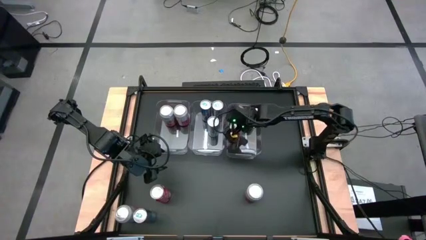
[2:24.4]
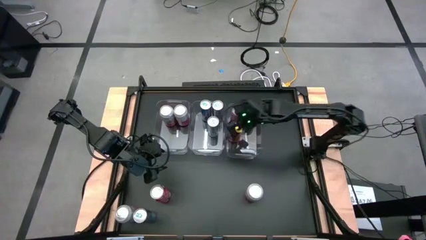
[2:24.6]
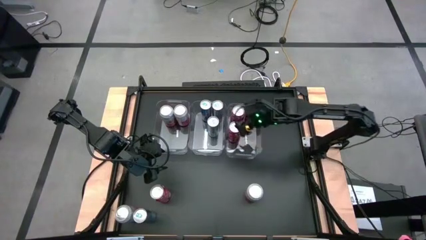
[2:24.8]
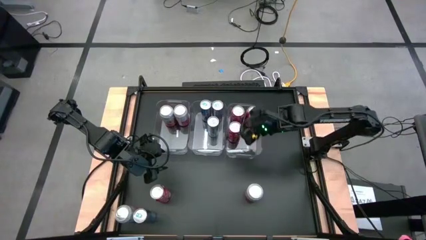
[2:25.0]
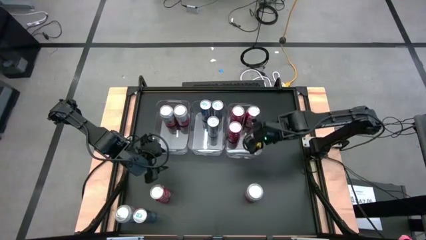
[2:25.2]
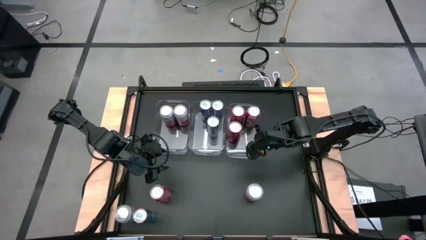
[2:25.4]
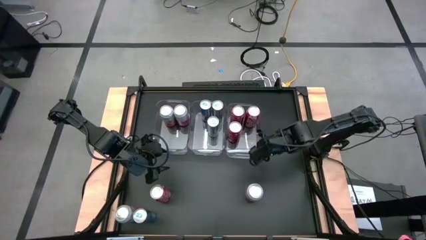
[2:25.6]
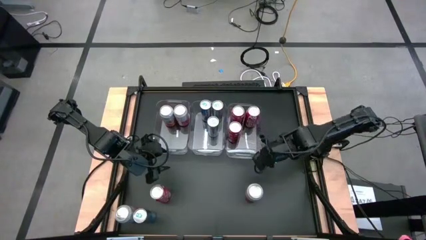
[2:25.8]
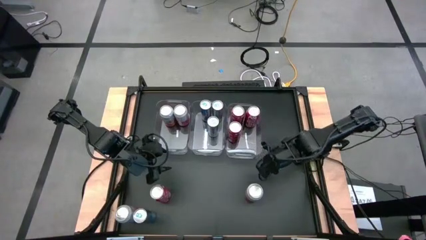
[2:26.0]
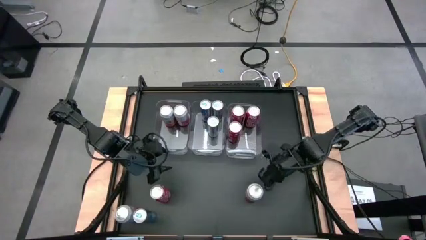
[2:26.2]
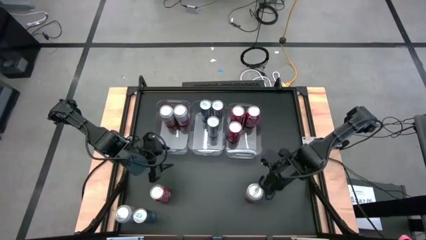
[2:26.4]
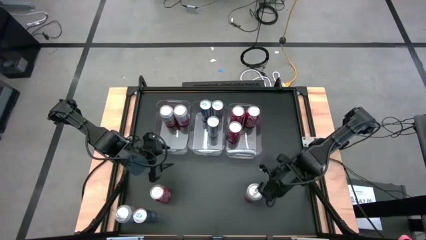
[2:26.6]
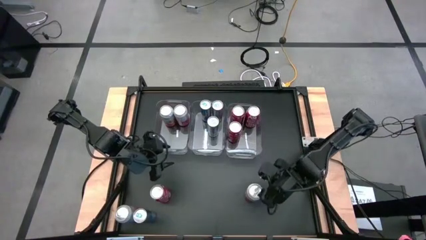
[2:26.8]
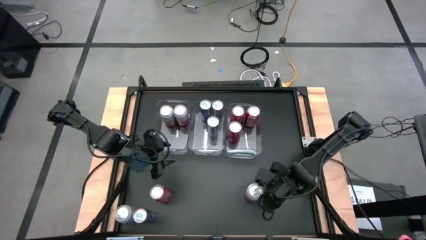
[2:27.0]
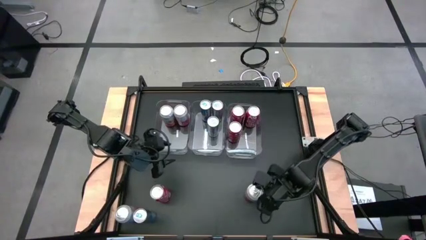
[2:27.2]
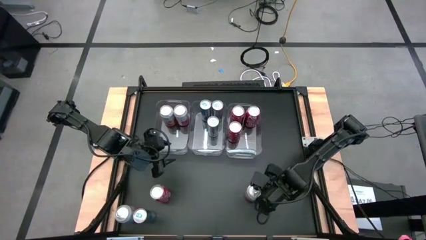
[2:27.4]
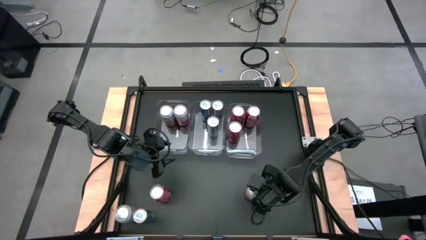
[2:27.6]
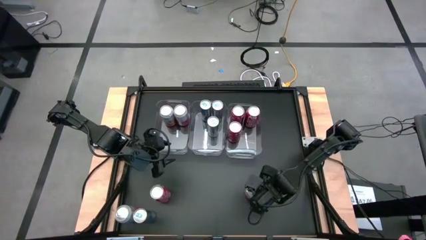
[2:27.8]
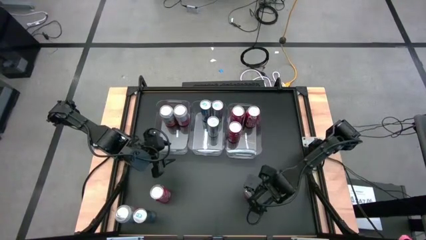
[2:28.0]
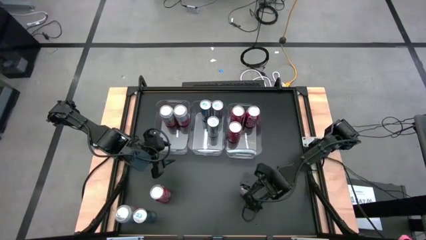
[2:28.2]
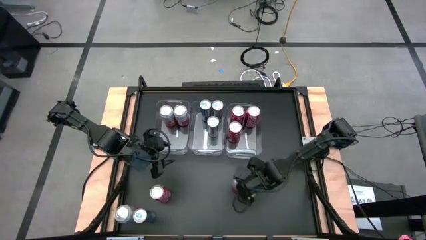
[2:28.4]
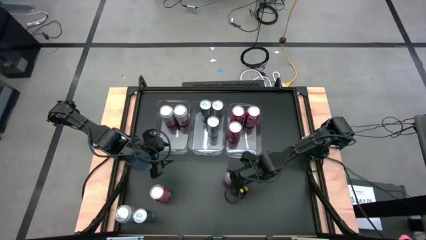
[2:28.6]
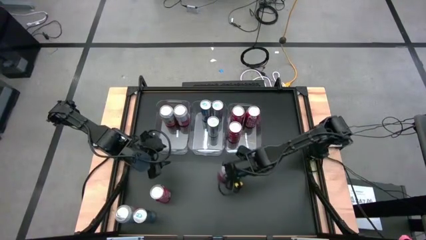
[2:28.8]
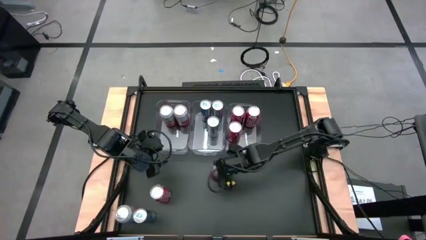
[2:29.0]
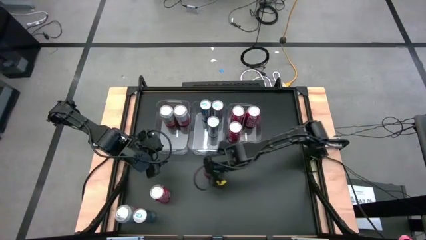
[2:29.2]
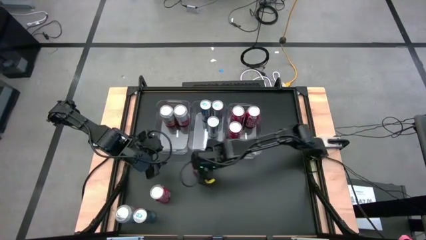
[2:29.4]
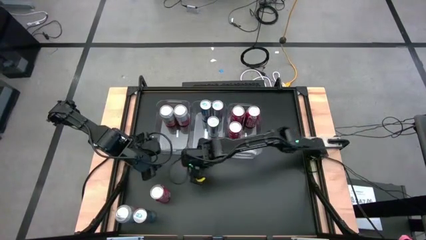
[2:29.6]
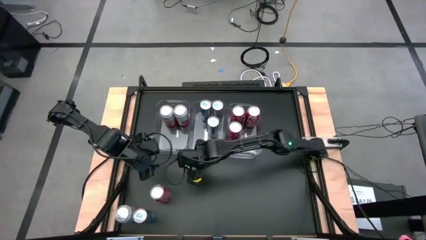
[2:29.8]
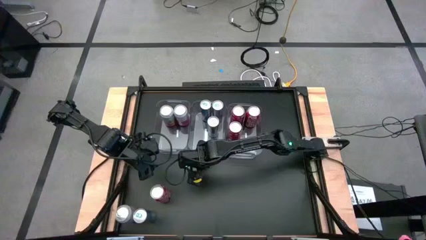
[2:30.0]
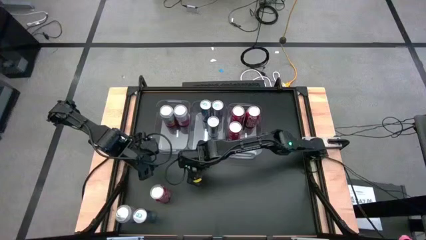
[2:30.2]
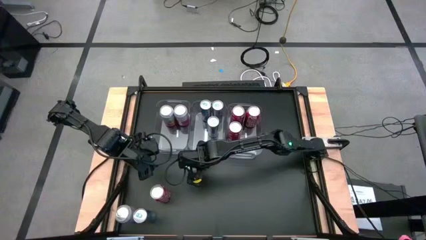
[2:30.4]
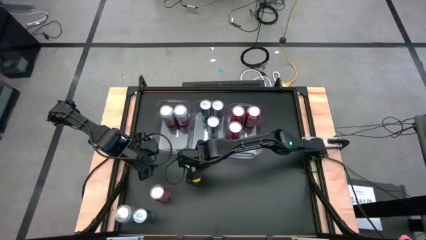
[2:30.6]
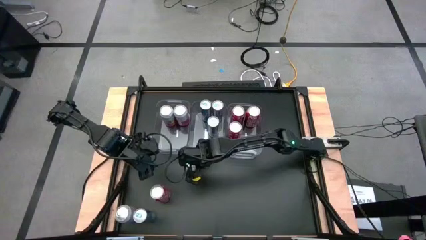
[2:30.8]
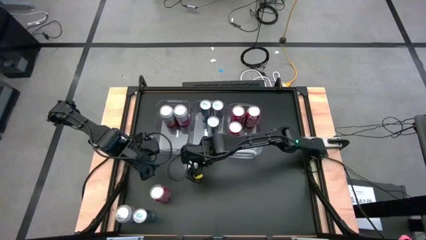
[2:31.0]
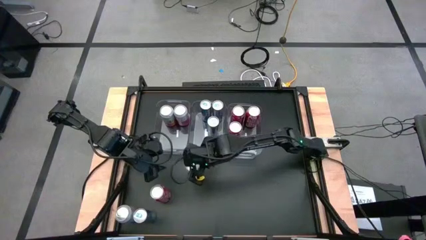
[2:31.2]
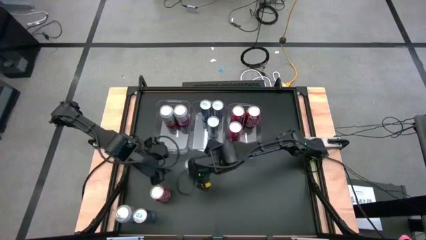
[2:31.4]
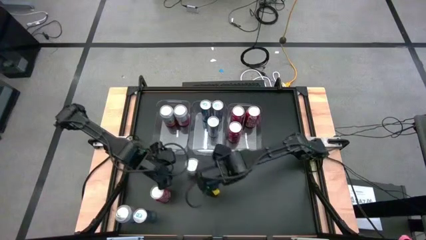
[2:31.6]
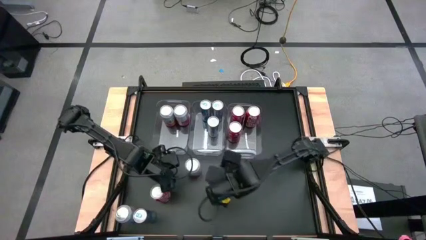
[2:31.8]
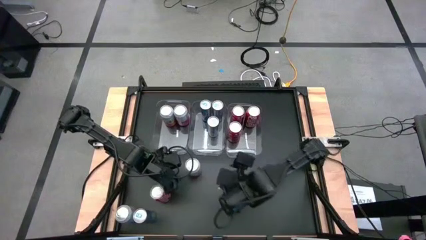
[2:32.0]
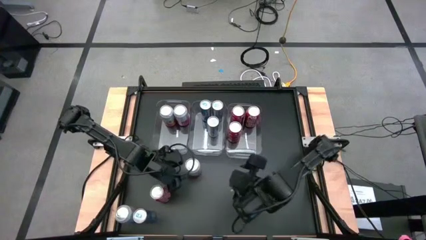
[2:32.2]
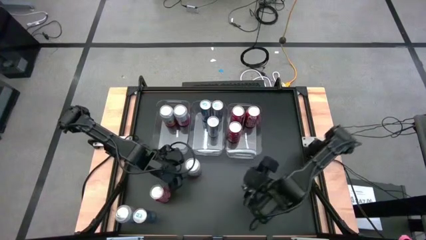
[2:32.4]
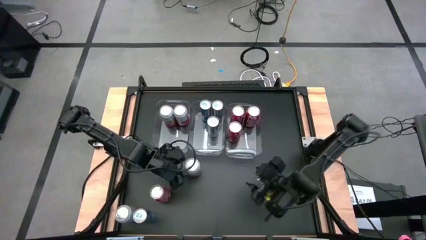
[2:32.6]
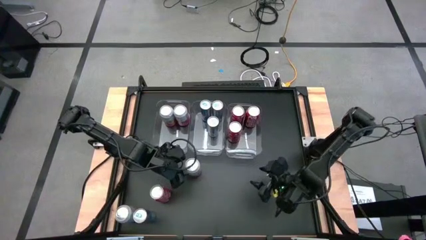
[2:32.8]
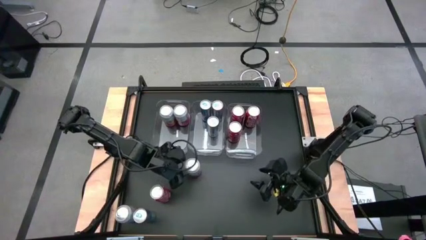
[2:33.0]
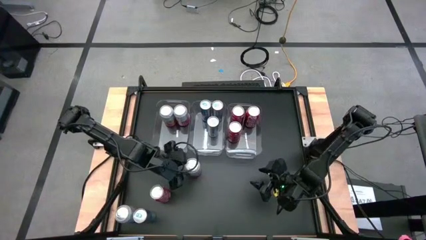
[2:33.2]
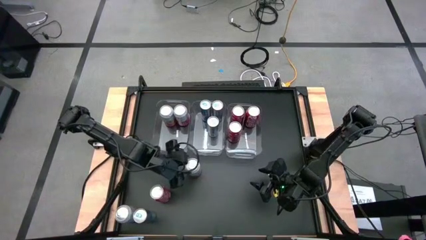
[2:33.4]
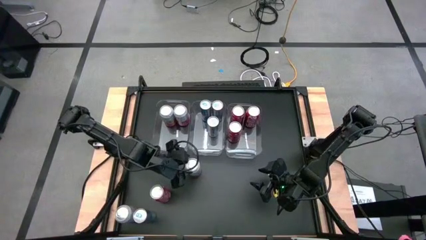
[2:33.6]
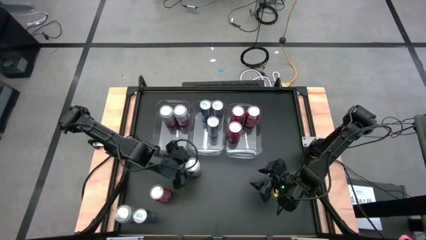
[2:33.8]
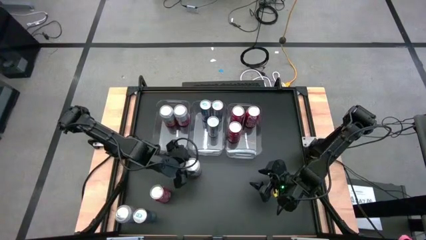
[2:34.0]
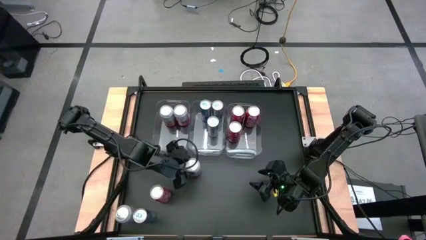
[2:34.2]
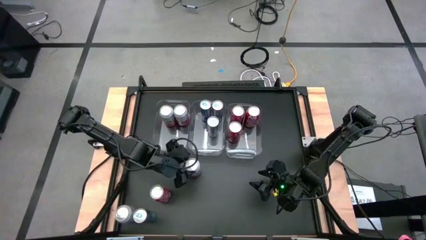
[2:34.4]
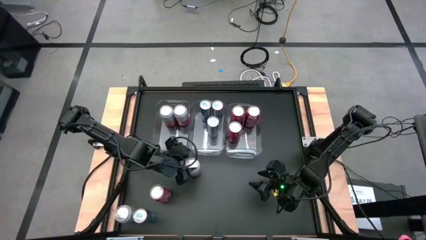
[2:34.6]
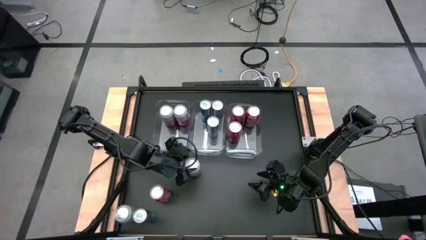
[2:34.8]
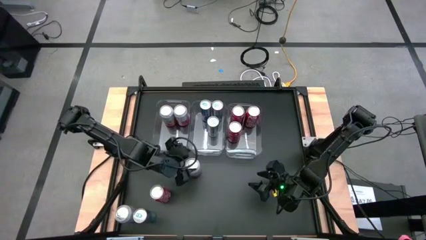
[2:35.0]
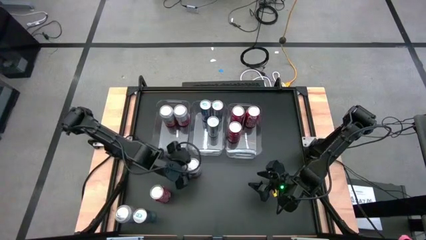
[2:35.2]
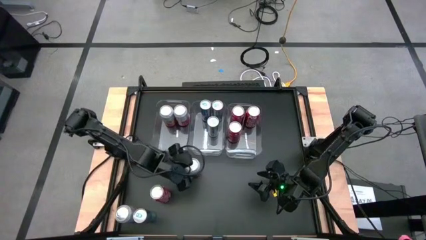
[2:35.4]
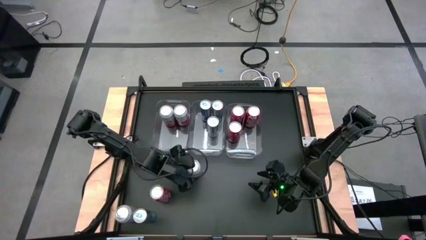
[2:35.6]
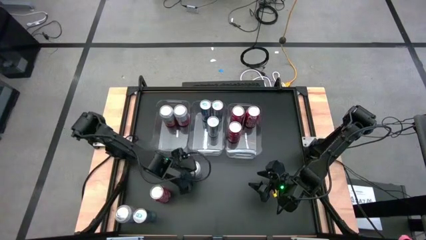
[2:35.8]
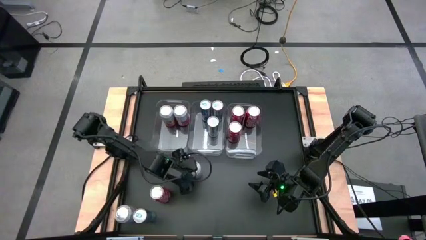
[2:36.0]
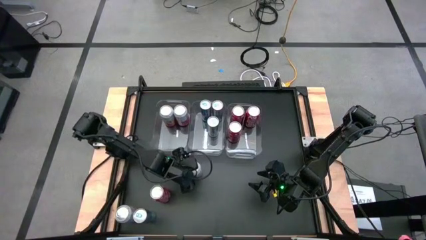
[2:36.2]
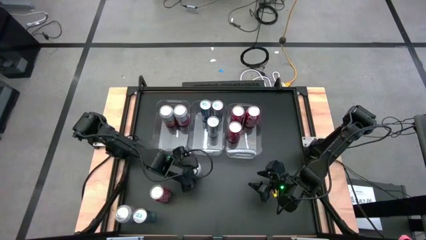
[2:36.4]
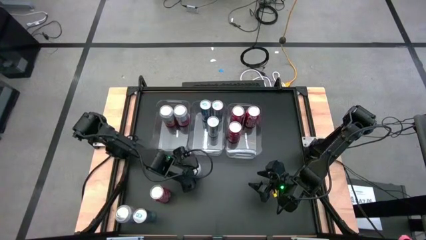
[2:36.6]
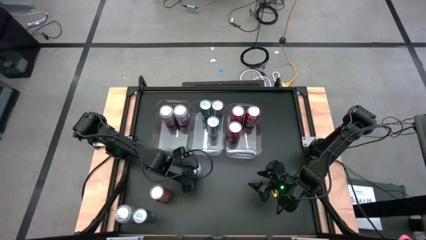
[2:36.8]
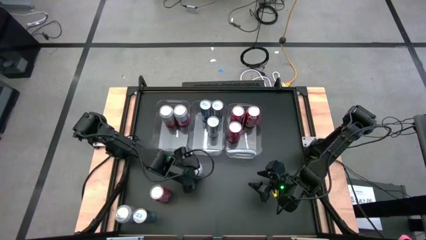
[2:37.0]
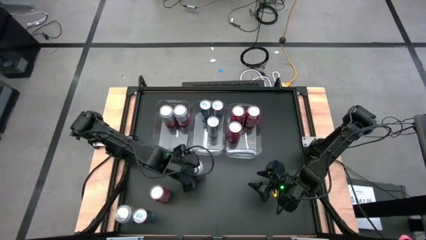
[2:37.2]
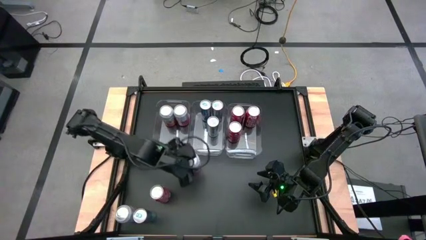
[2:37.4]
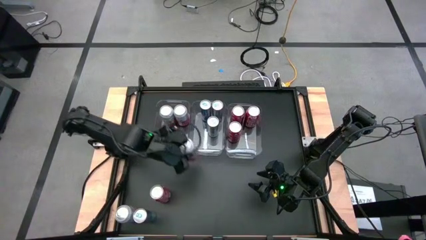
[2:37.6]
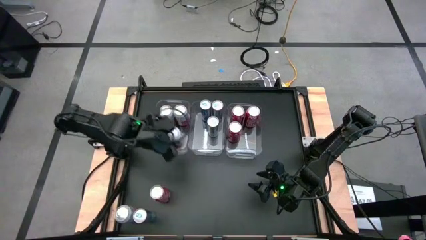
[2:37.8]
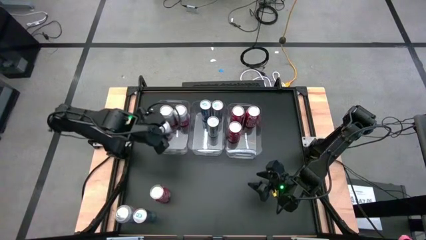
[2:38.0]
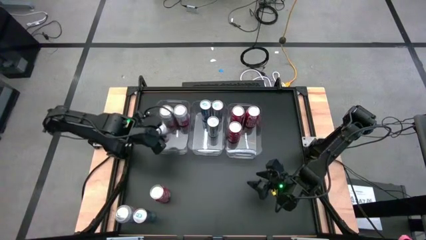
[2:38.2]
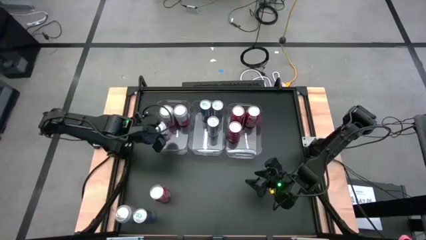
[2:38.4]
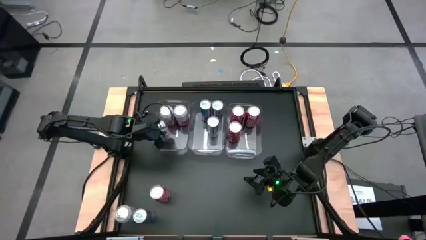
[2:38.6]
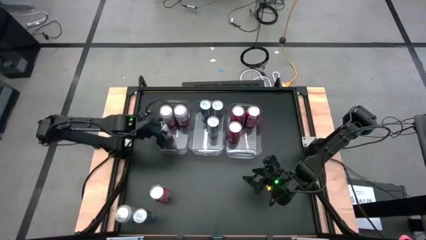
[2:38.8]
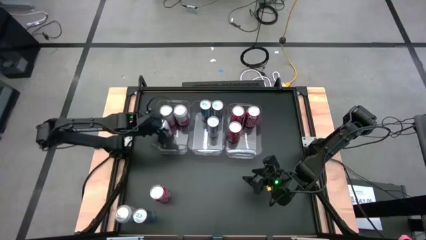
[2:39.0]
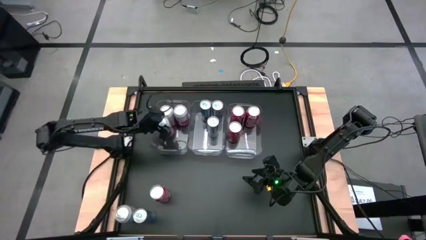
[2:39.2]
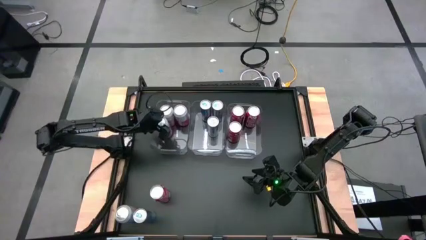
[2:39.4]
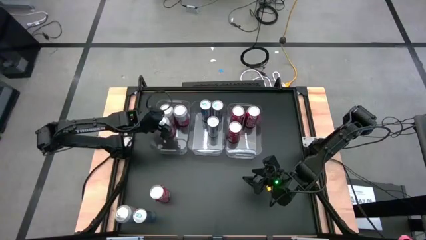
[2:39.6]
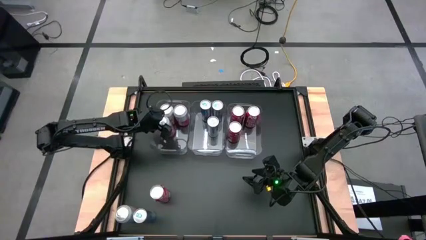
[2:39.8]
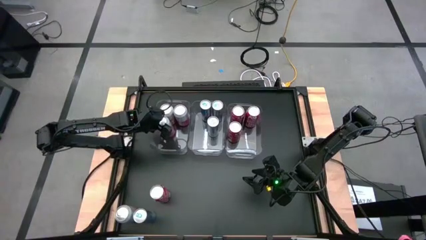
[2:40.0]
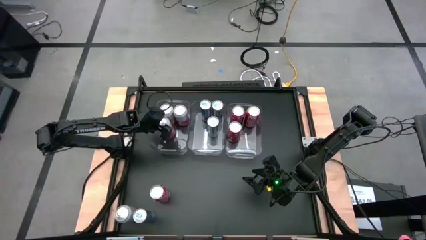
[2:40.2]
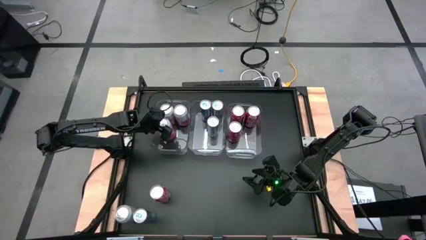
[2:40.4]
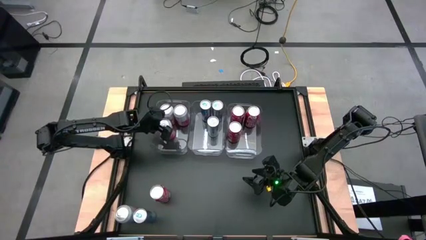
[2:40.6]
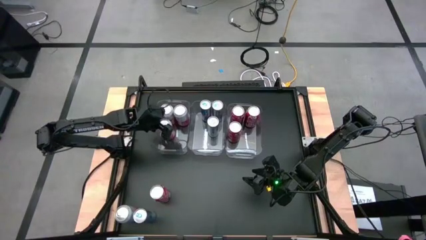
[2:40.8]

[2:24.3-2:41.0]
Task: Sort soda cans
Put the pink soda into the left transparent bin
